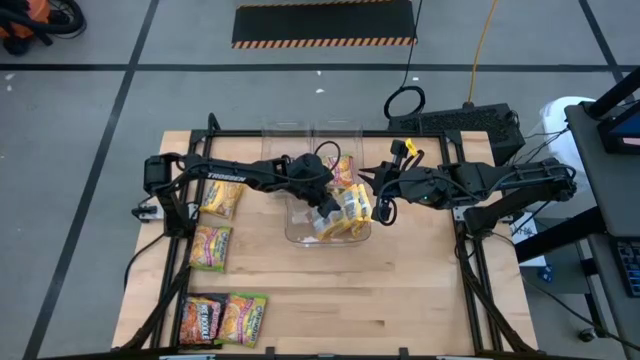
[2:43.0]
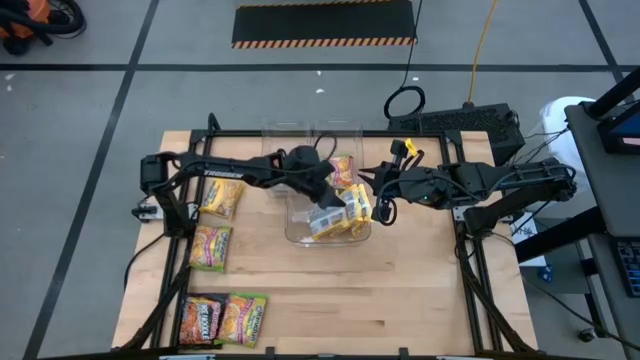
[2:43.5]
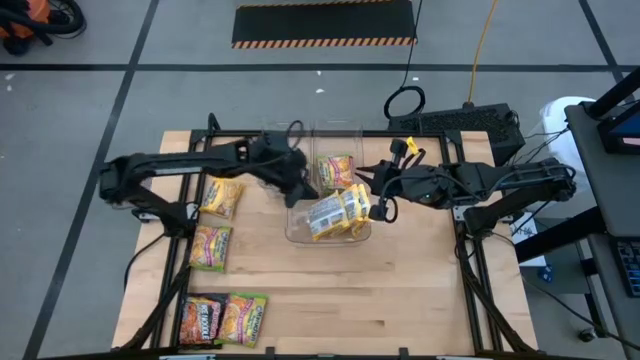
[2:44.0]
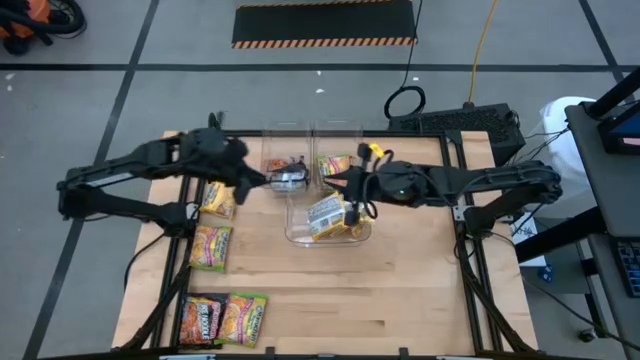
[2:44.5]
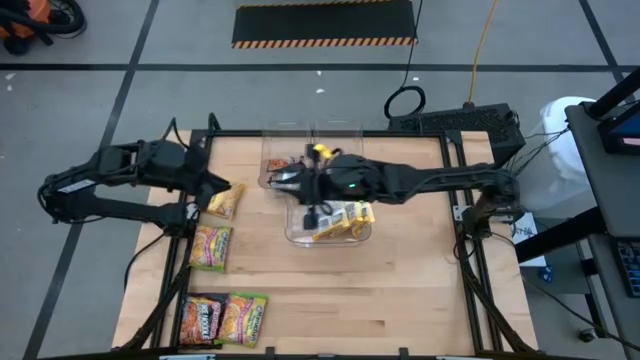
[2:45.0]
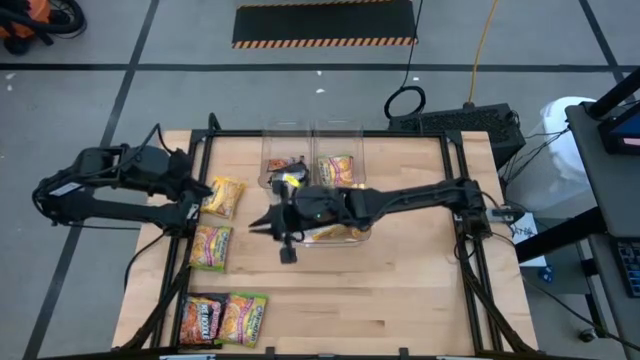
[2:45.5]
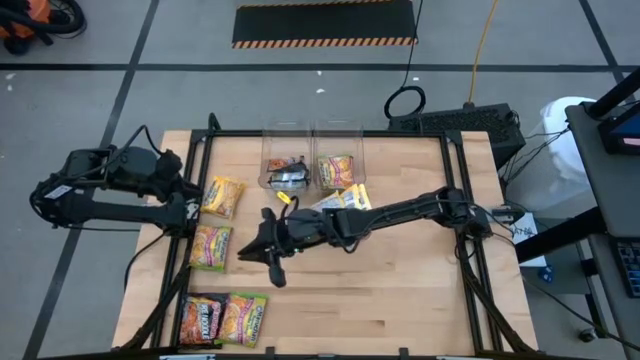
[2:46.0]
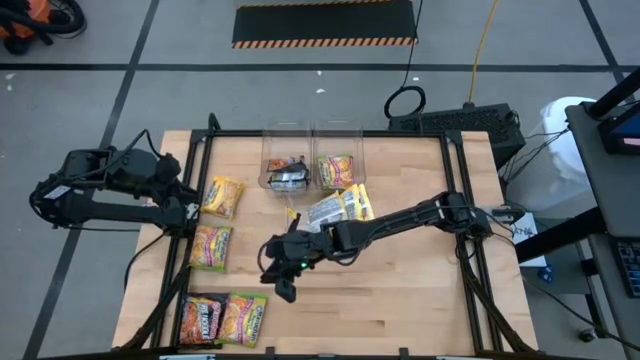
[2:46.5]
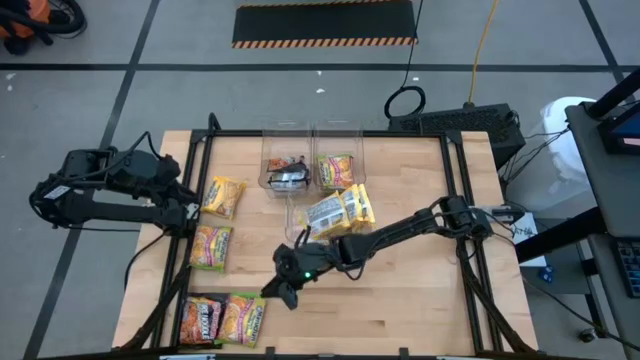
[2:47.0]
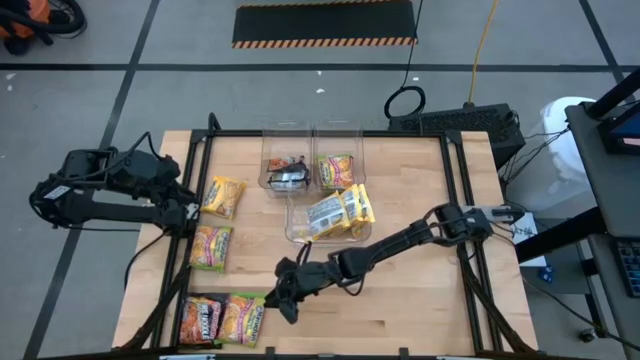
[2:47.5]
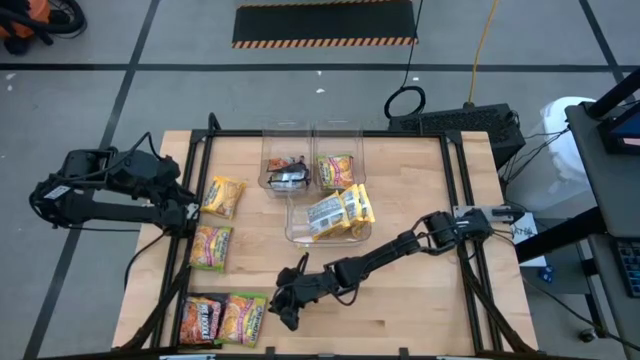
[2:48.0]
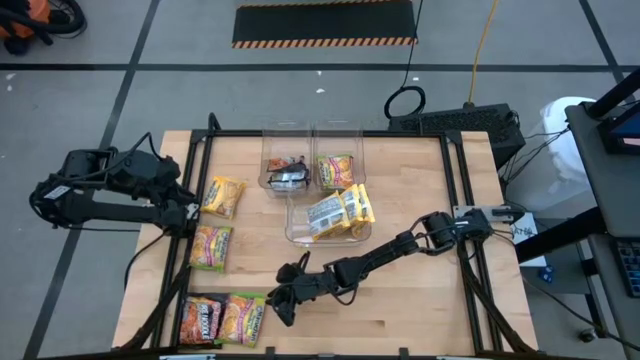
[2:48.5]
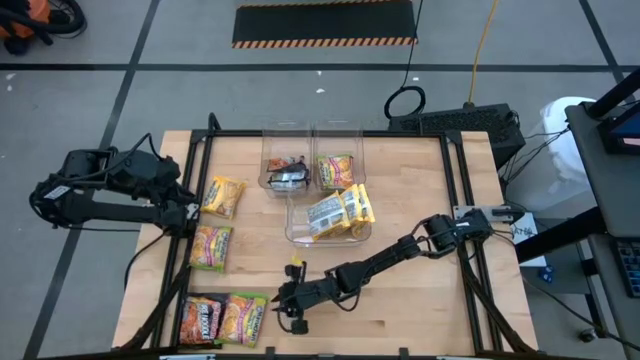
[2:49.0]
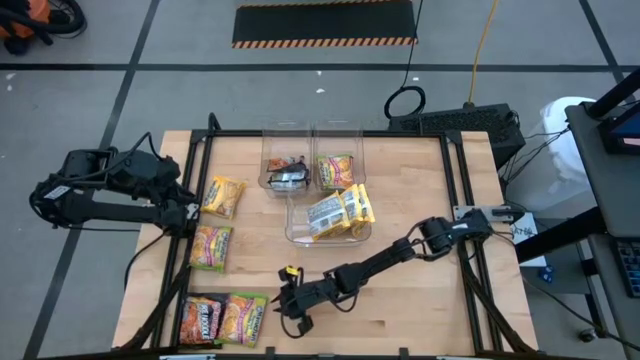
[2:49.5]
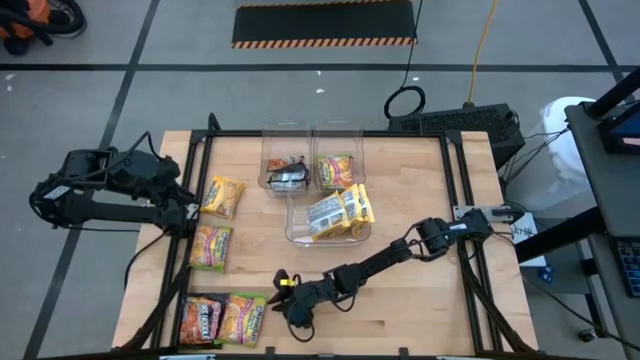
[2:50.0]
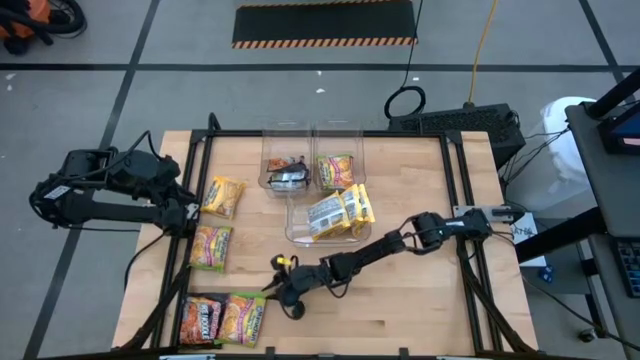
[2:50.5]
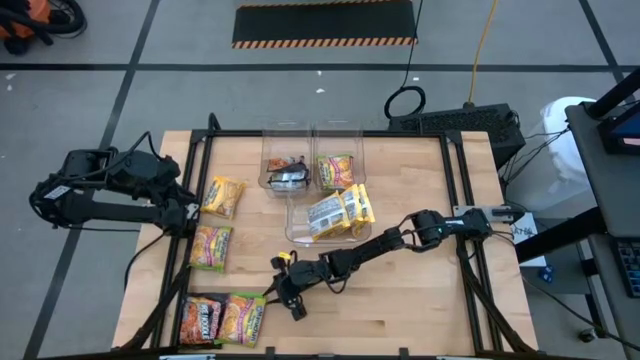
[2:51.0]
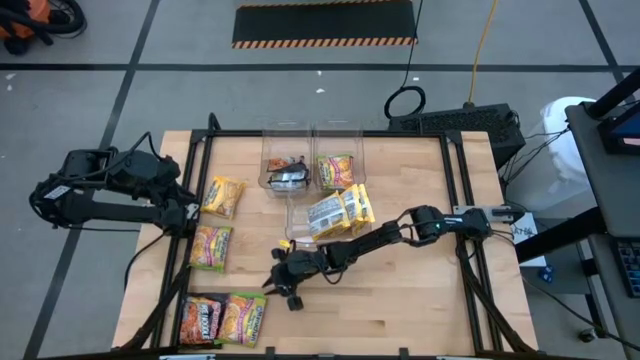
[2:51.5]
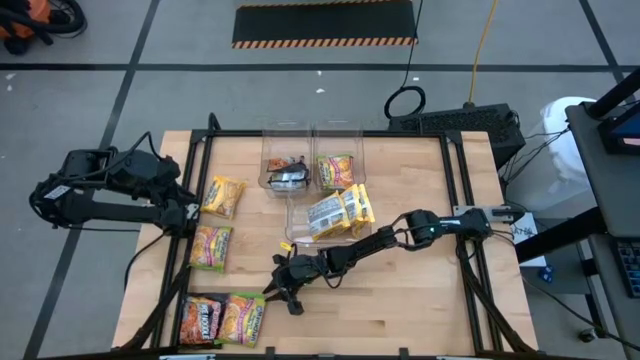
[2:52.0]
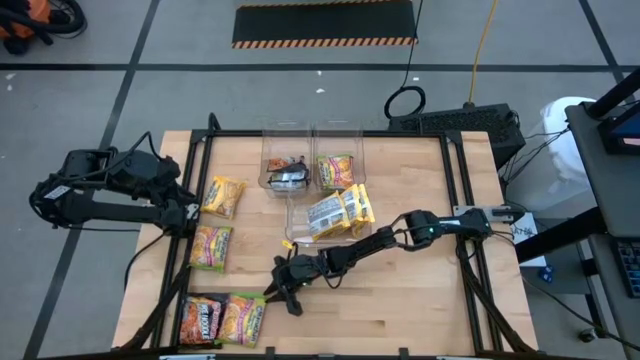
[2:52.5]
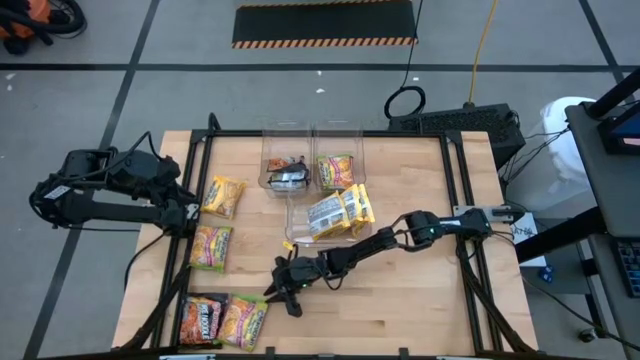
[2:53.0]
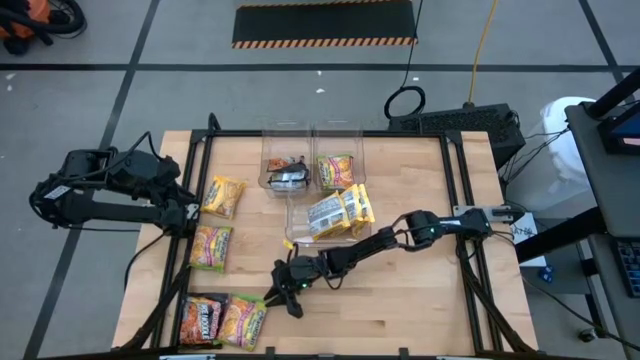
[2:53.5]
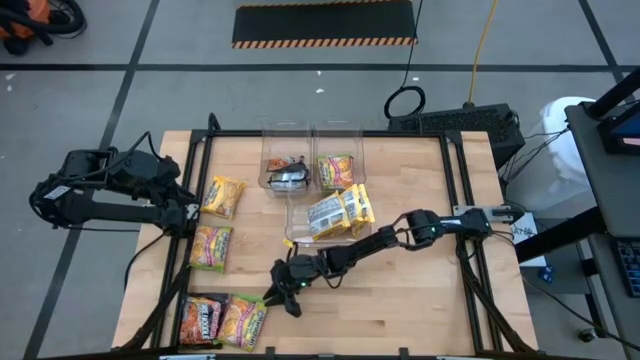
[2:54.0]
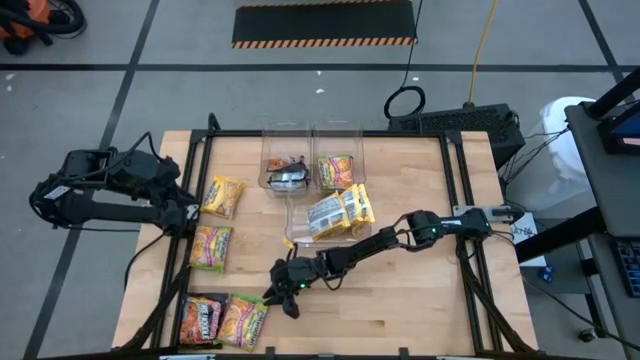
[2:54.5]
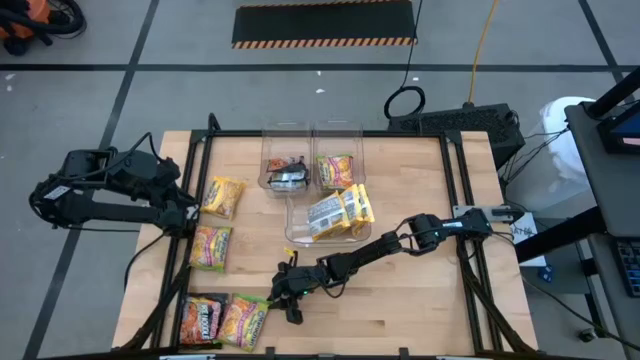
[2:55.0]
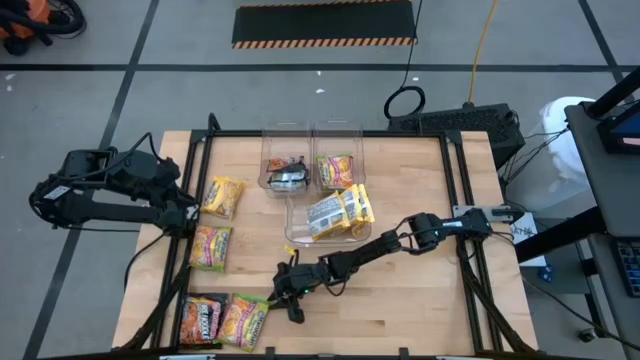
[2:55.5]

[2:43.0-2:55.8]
Task: Sort Maruchan noodles
Put the green noodle pack into the top right transparent bin

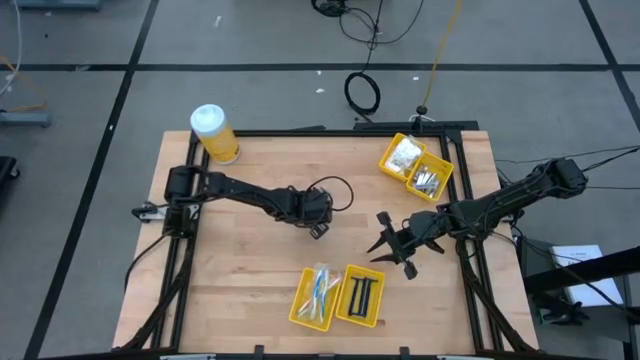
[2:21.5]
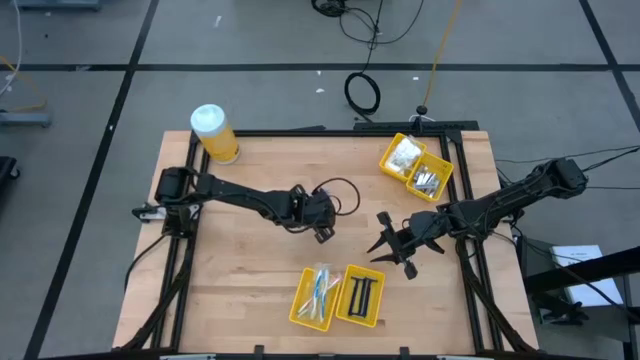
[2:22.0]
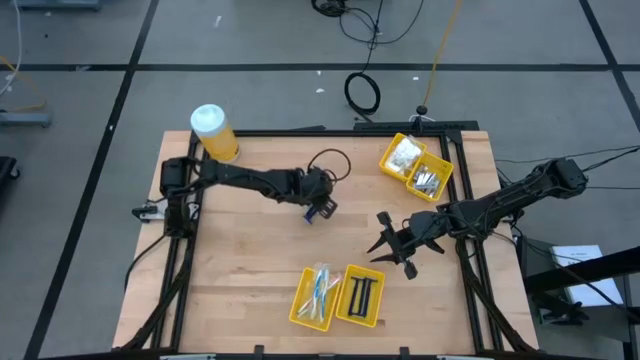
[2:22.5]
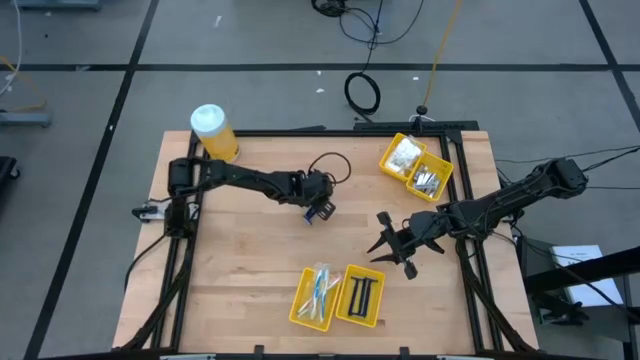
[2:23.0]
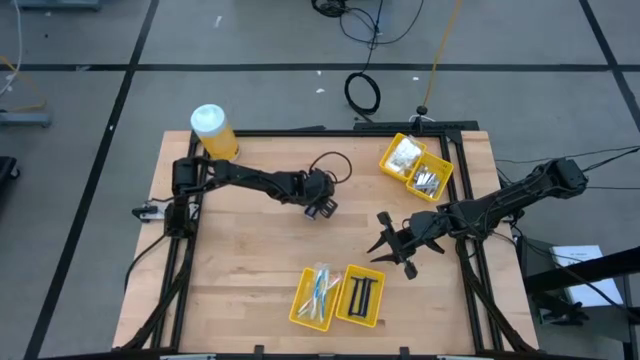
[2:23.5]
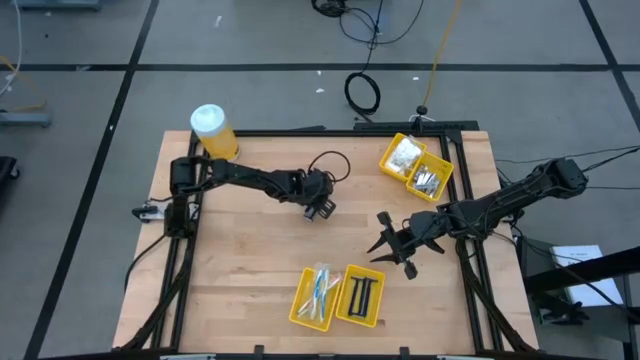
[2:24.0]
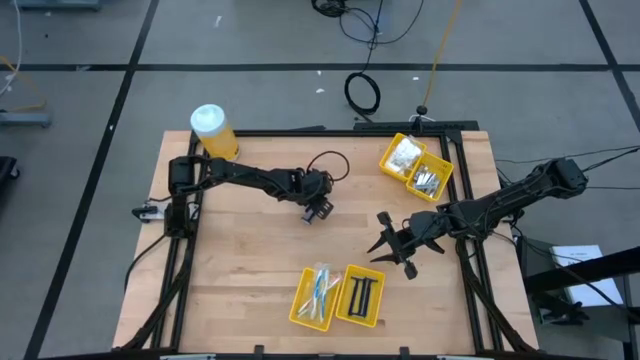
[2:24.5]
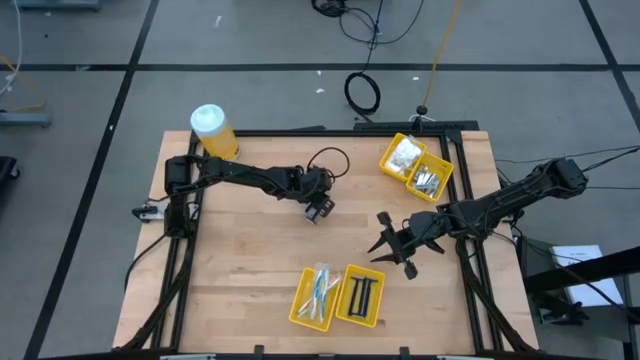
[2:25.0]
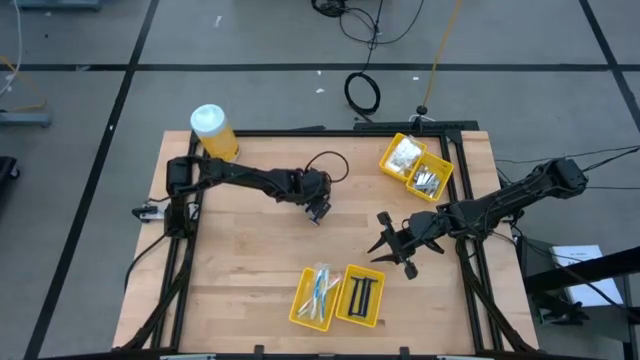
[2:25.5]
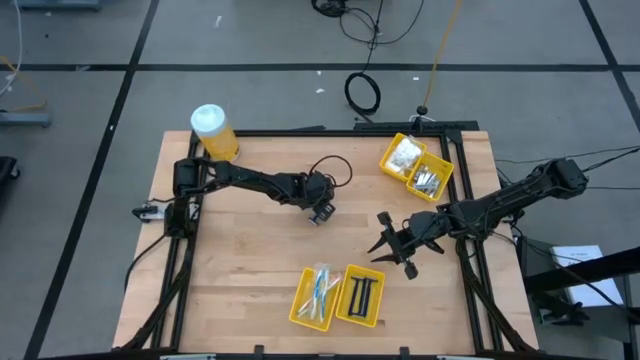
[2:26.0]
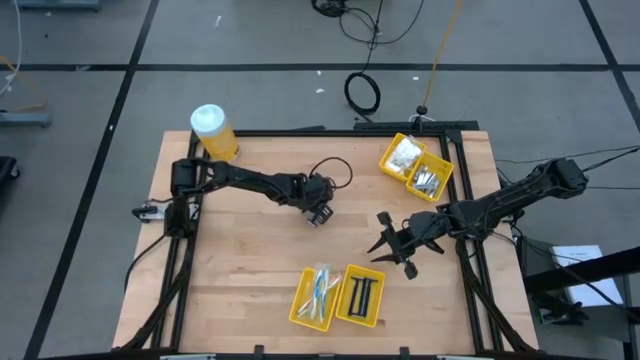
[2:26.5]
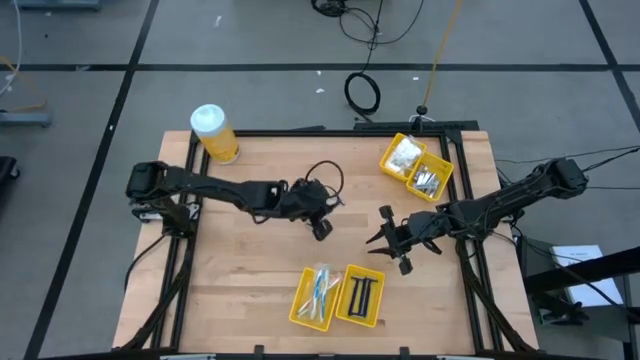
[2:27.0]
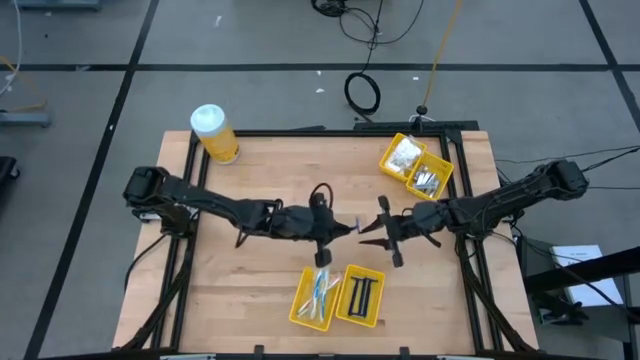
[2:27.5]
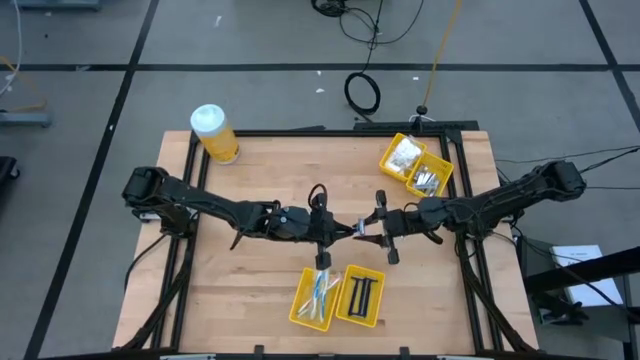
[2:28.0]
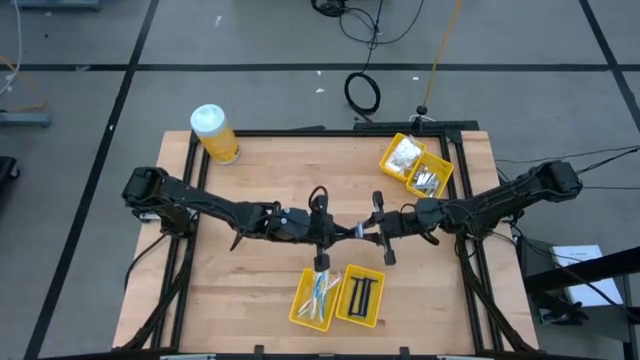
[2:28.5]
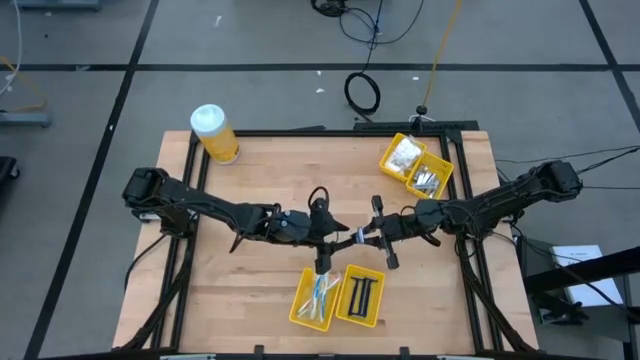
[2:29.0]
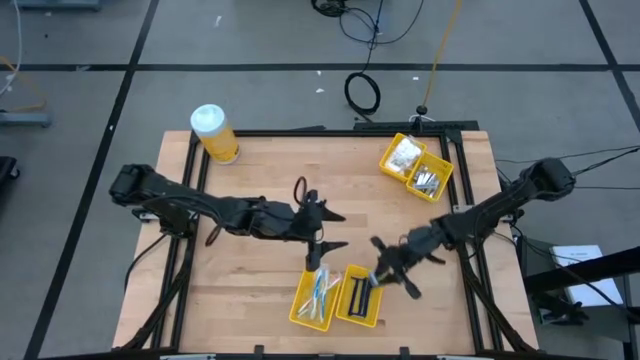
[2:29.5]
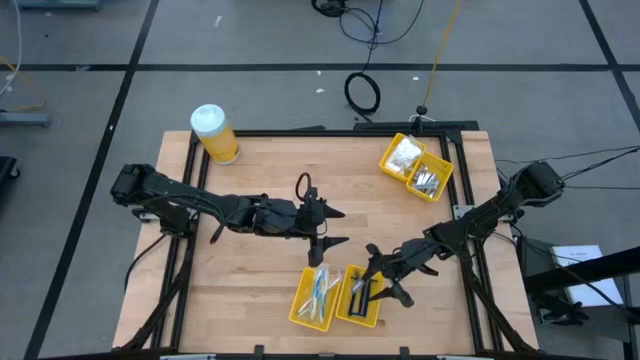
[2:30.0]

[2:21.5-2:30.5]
Task: Pick & Place Travel size toiletries
Put the blue rolled gauze into the bottom right yellow bin

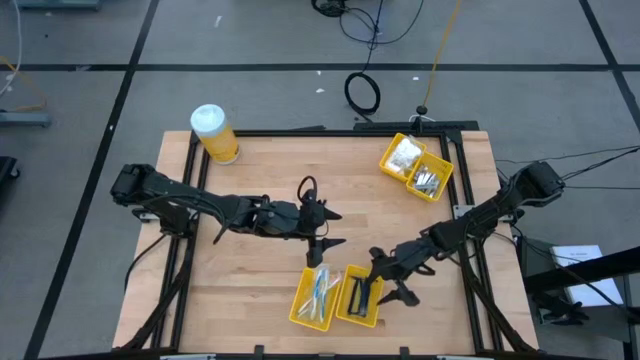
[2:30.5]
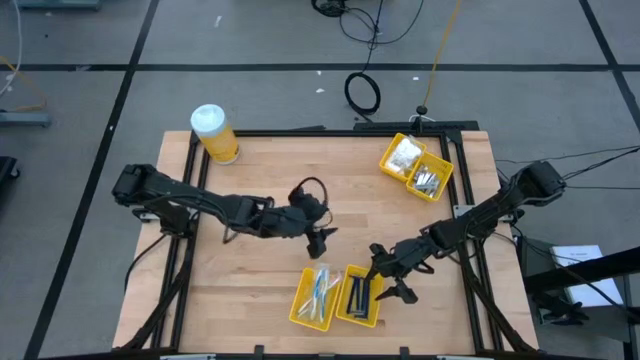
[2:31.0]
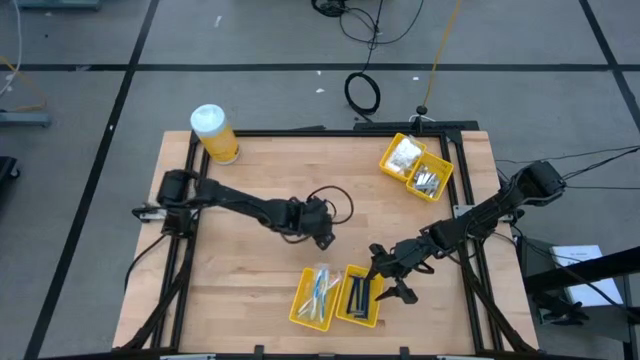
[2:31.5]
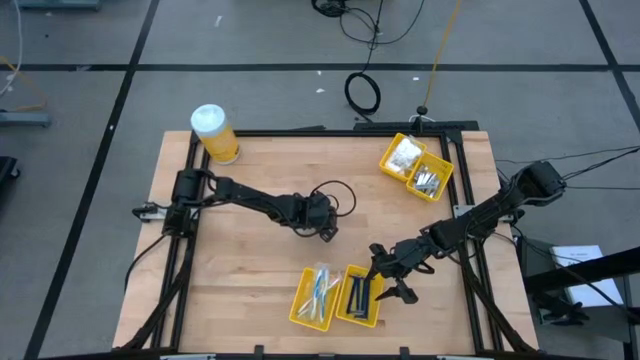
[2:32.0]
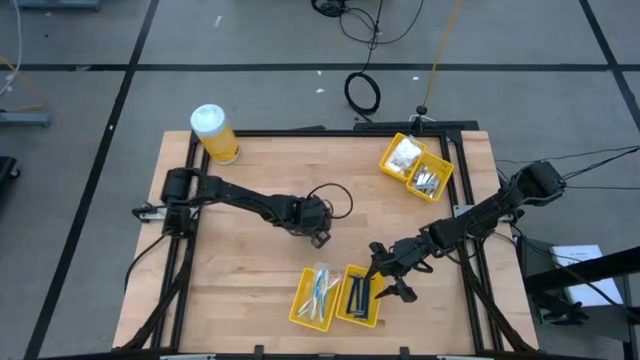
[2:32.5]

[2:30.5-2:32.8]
Put the blue rolled gauze into the bottom right yellow bin
